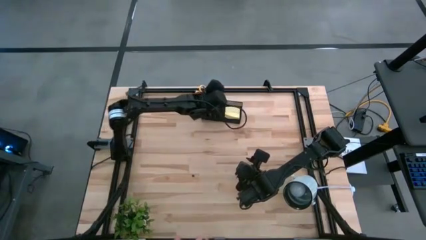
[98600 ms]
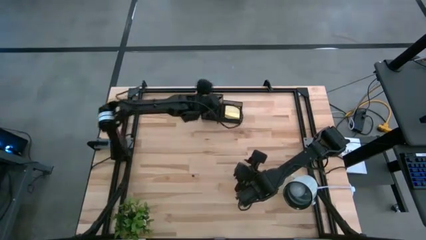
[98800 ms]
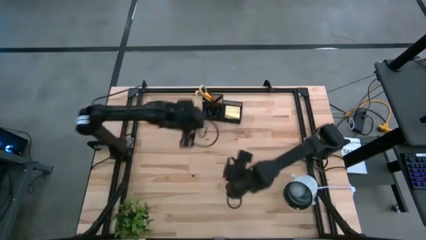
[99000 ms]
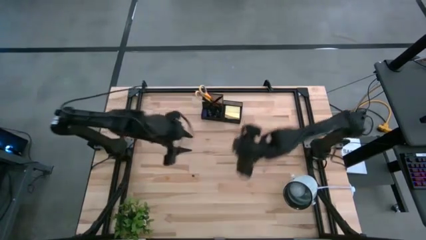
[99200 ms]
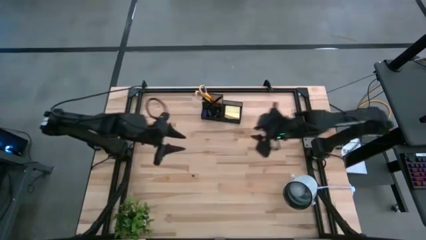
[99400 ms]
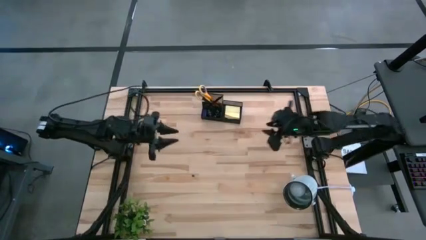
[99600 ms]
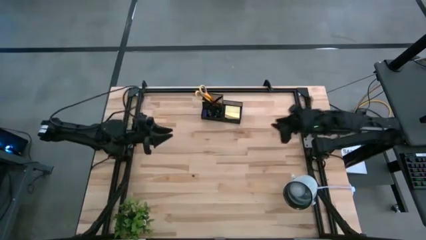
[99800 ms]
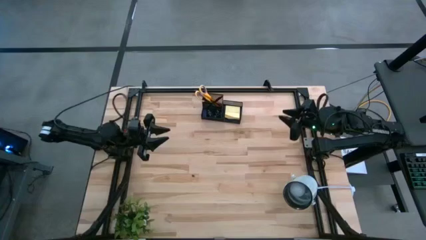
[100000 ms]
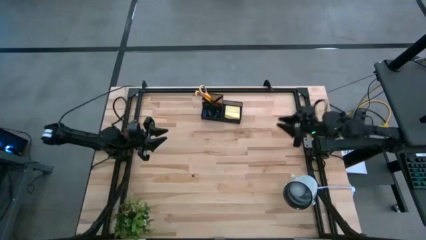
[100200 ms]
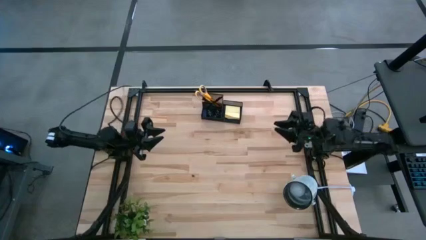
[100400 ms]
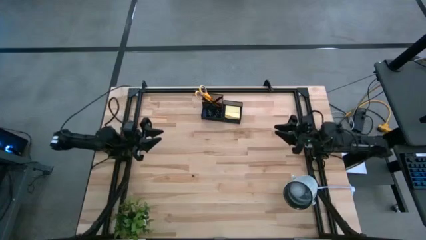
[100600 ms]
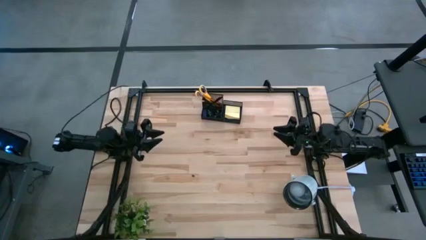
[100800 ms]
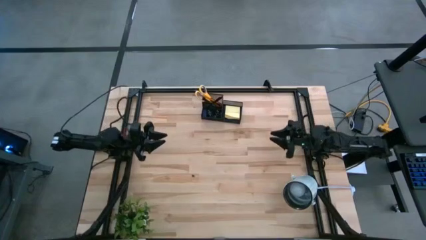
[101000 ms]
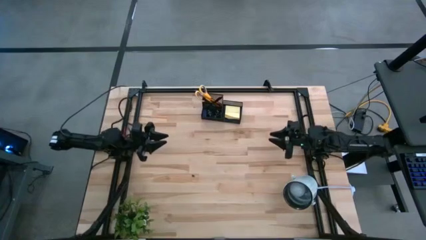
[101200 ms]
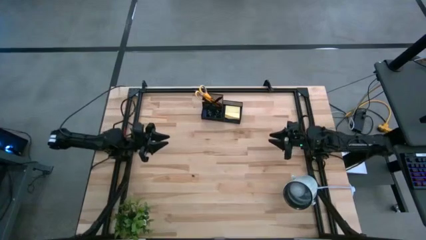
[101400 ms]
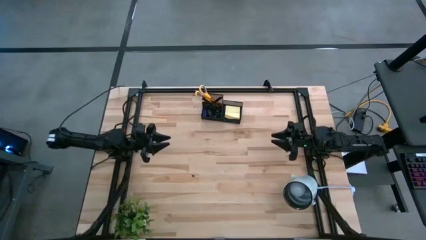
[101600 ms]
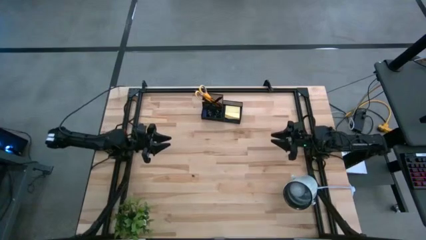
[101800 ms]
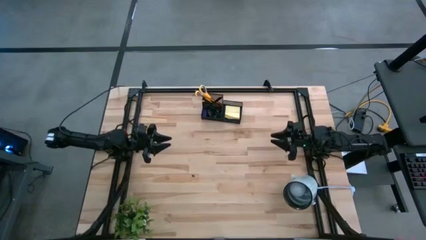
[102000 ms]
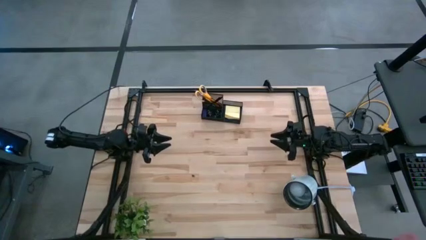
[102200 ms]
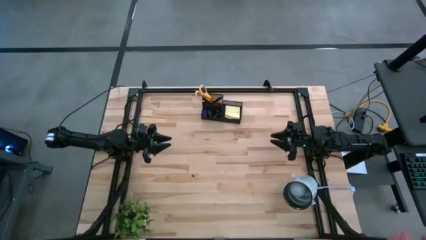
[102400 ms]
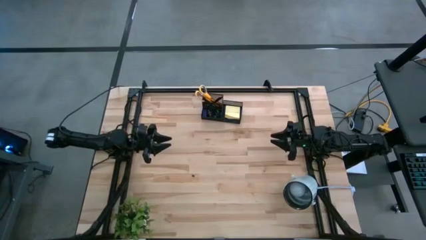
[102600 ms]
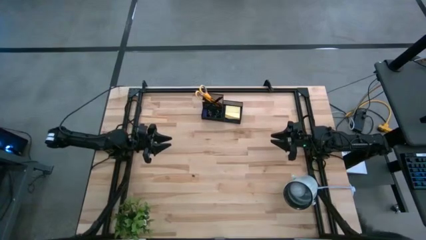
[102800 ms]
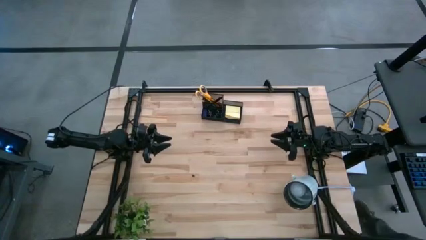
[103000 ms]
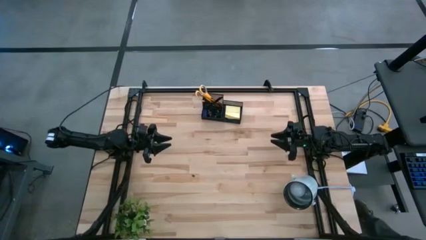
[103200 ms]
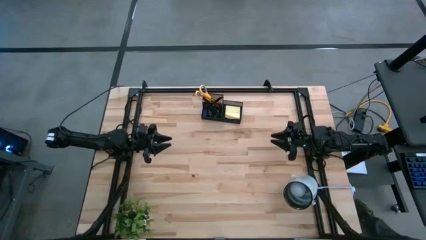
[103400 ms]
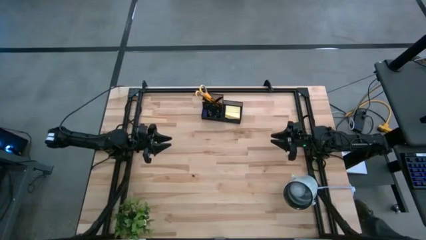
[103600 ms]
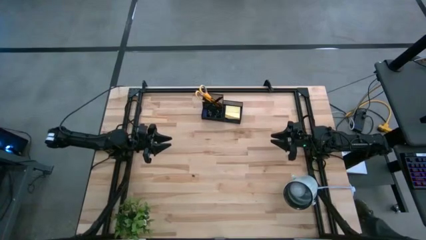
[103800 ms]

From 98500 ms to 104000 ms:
Task: Pick and place office supplies into organizer
Return to Home Position

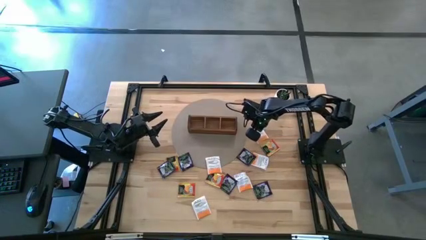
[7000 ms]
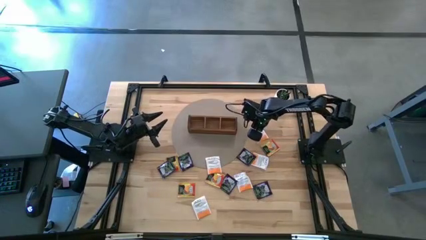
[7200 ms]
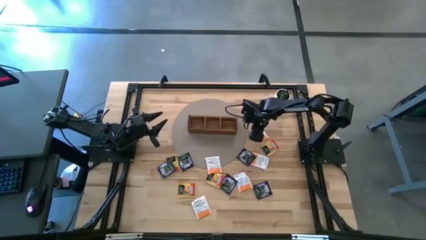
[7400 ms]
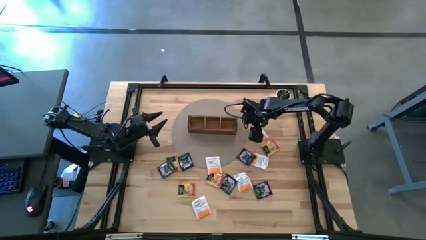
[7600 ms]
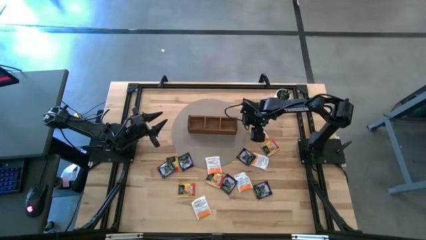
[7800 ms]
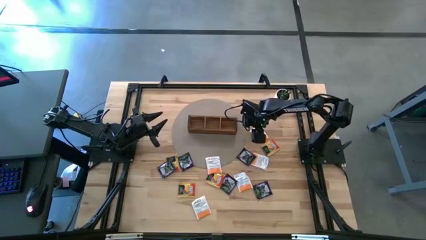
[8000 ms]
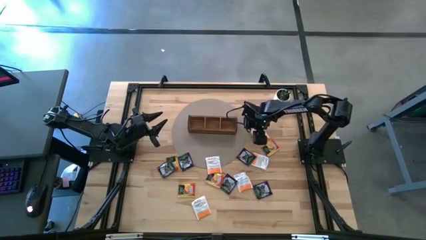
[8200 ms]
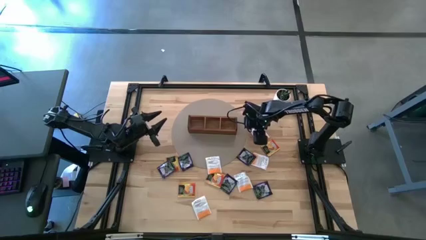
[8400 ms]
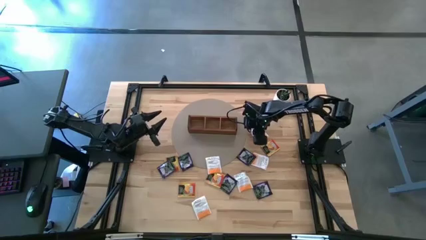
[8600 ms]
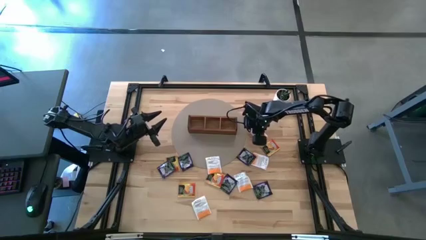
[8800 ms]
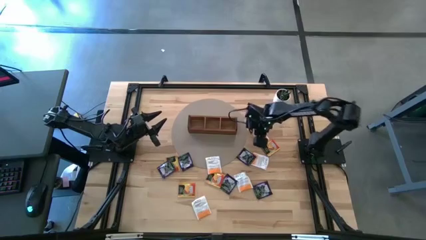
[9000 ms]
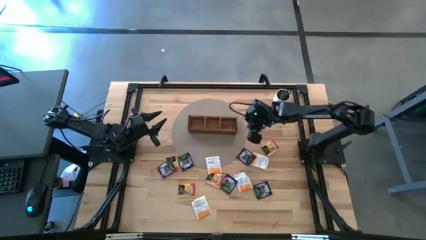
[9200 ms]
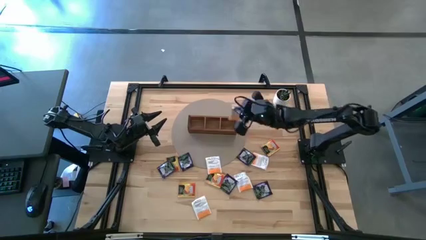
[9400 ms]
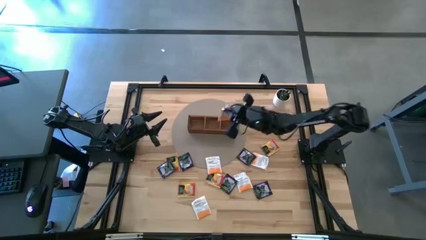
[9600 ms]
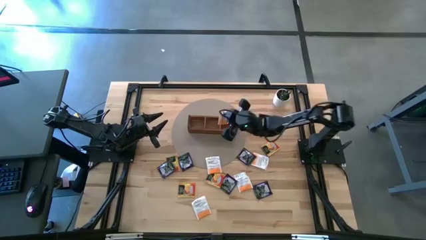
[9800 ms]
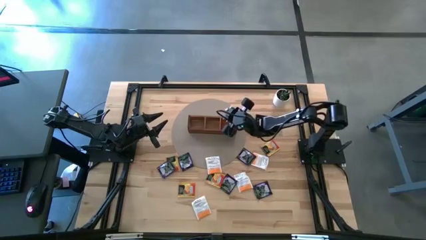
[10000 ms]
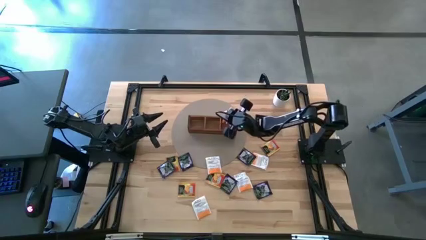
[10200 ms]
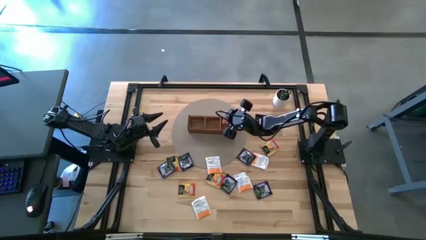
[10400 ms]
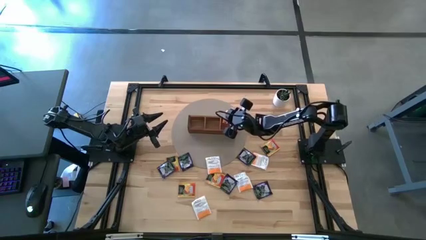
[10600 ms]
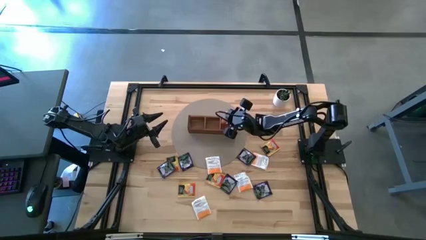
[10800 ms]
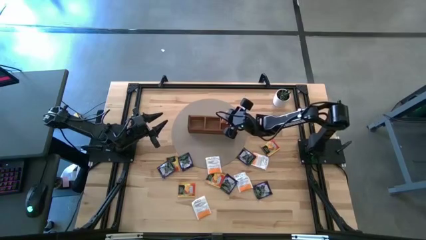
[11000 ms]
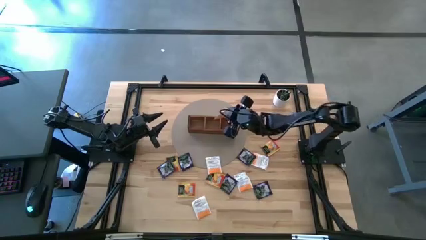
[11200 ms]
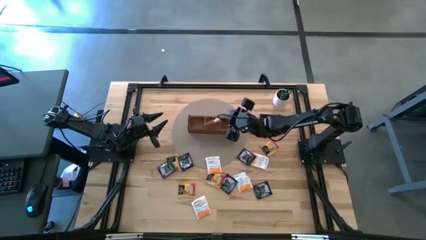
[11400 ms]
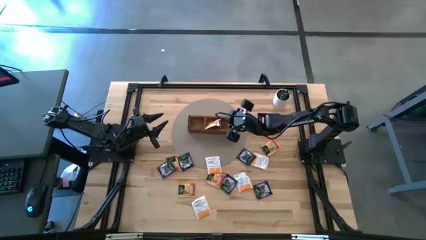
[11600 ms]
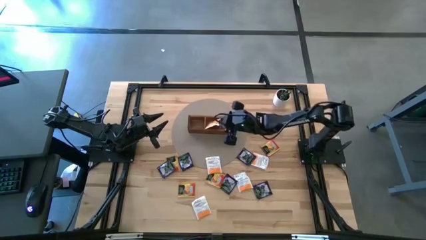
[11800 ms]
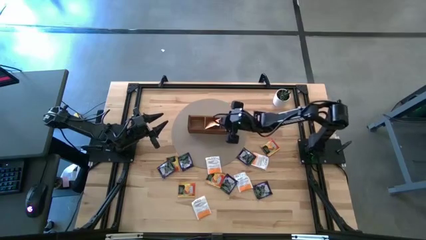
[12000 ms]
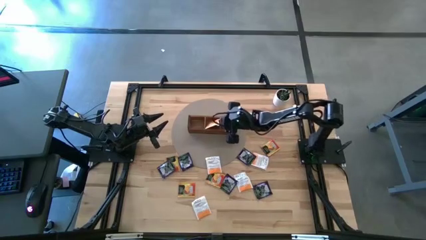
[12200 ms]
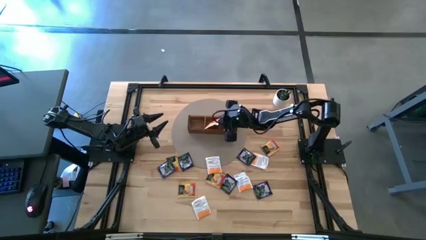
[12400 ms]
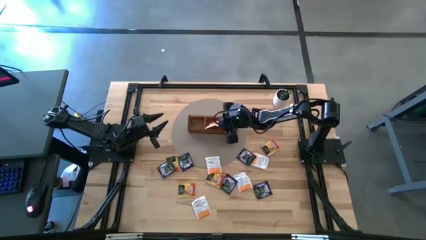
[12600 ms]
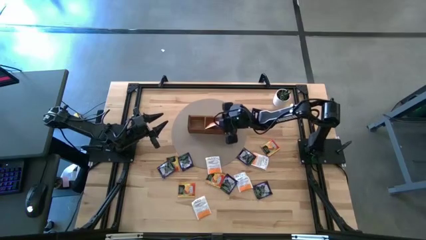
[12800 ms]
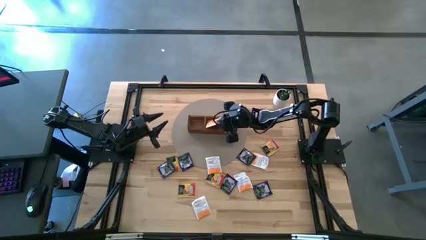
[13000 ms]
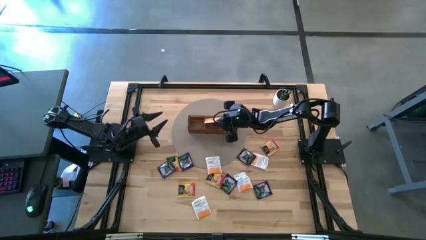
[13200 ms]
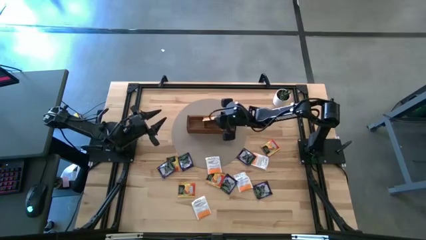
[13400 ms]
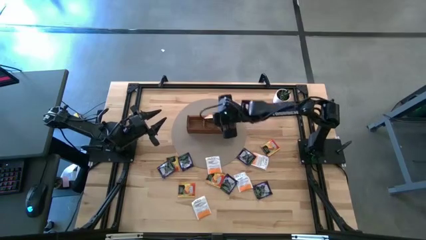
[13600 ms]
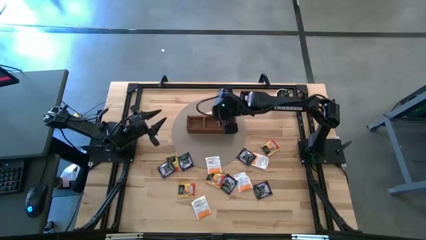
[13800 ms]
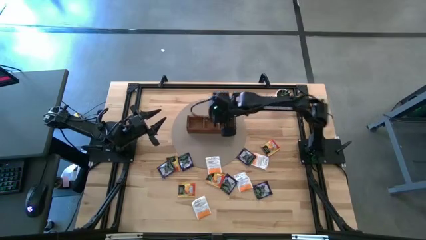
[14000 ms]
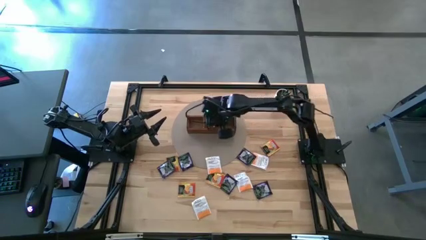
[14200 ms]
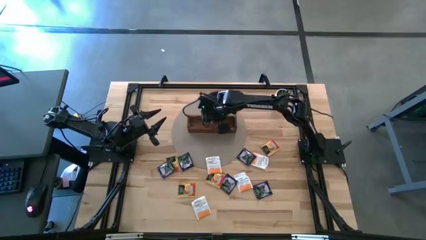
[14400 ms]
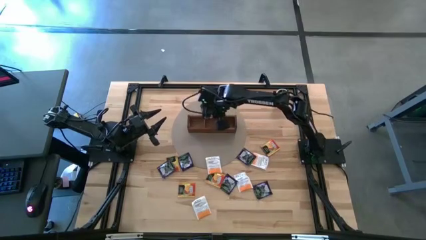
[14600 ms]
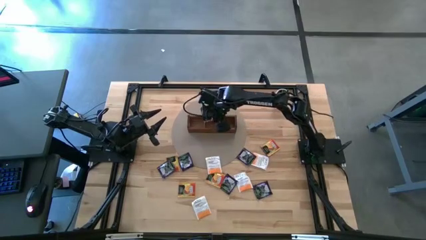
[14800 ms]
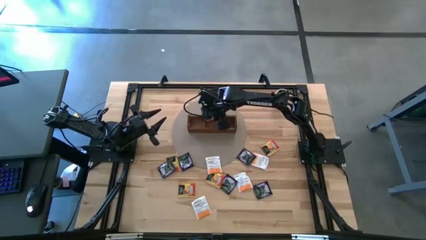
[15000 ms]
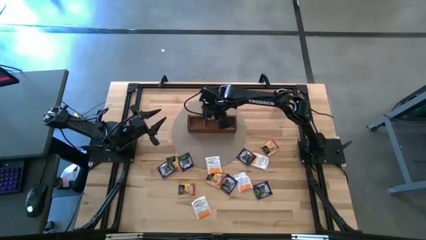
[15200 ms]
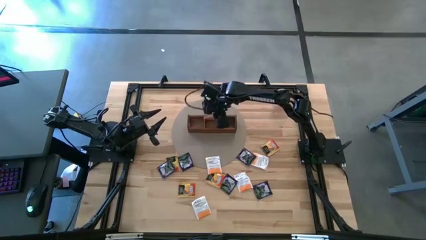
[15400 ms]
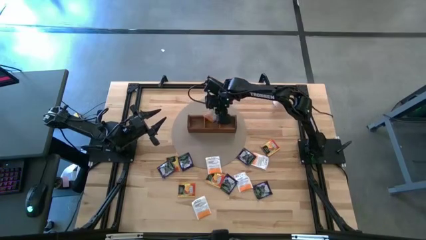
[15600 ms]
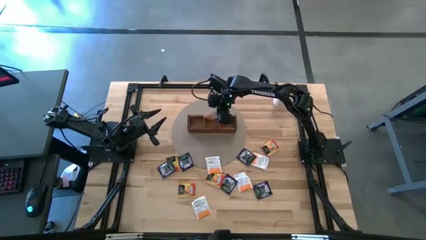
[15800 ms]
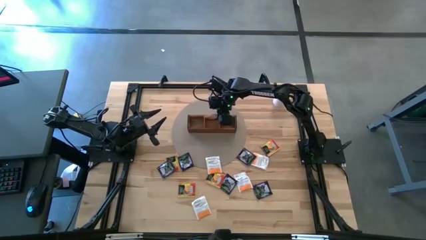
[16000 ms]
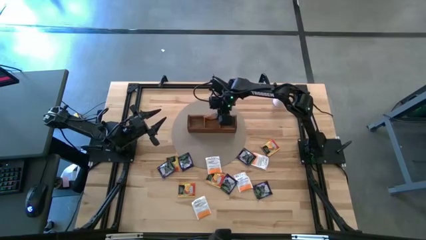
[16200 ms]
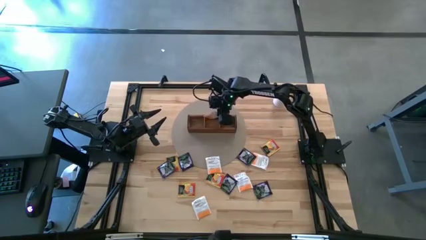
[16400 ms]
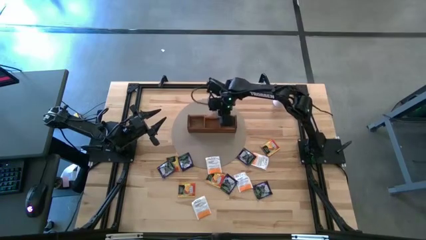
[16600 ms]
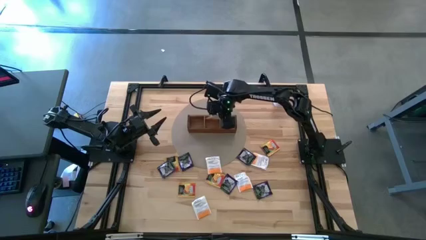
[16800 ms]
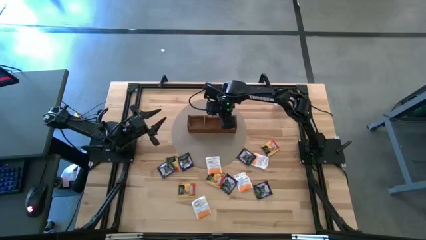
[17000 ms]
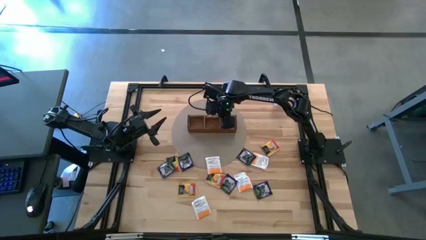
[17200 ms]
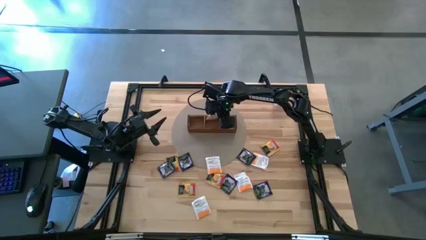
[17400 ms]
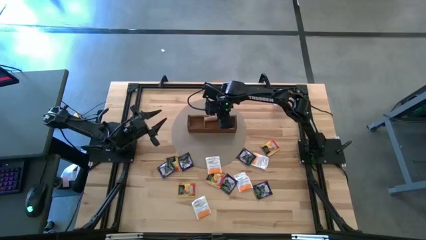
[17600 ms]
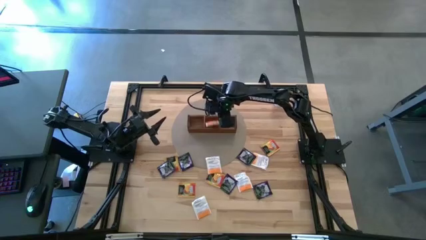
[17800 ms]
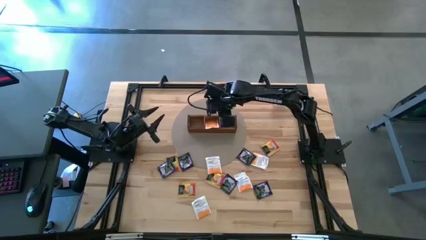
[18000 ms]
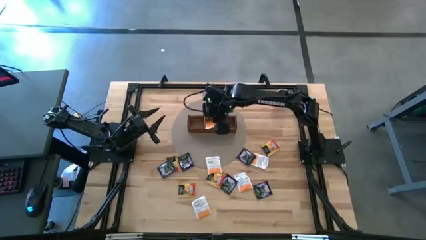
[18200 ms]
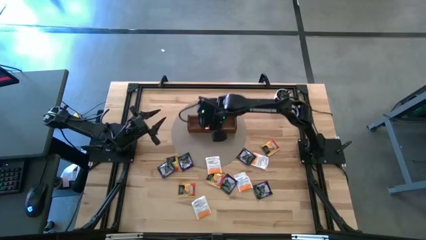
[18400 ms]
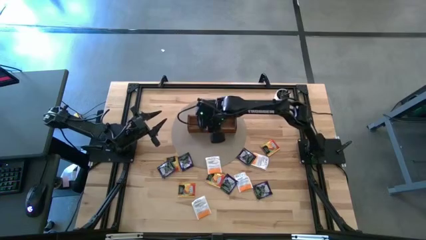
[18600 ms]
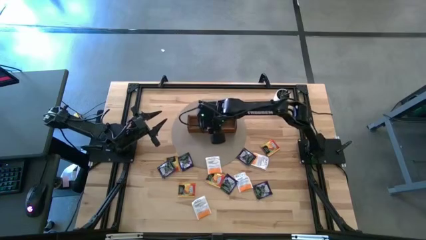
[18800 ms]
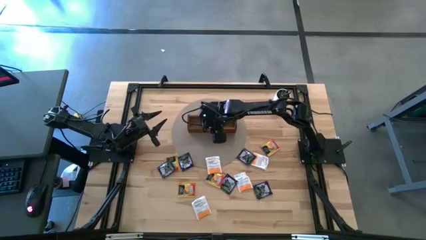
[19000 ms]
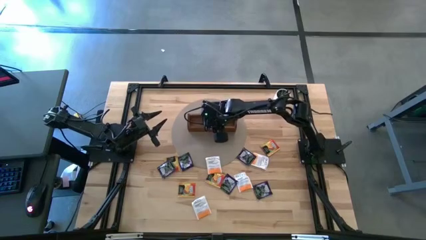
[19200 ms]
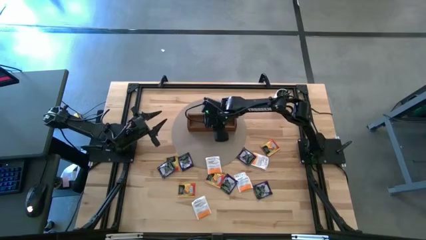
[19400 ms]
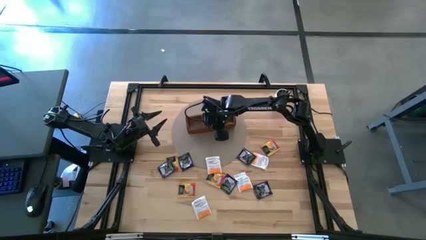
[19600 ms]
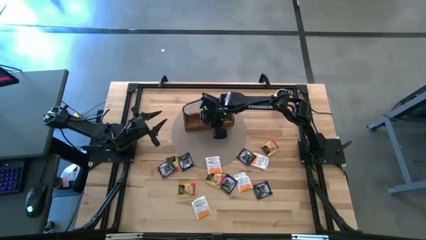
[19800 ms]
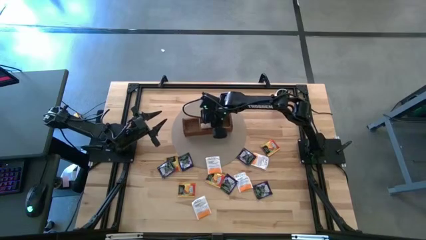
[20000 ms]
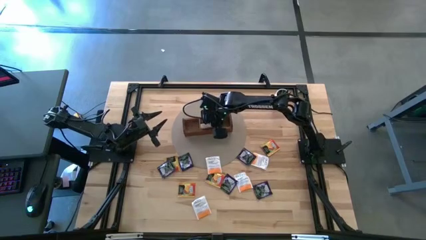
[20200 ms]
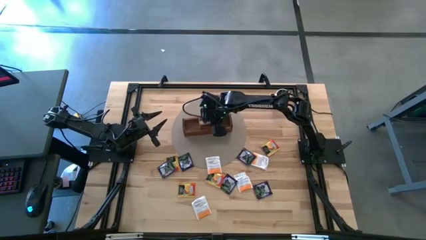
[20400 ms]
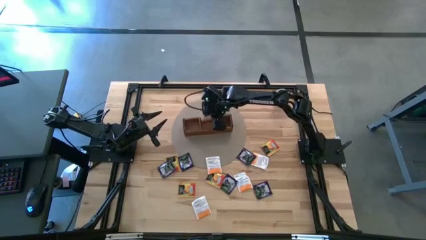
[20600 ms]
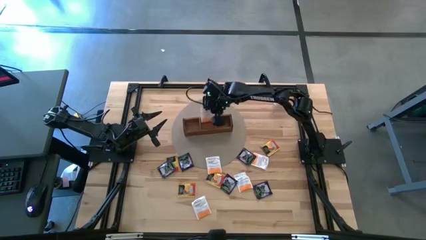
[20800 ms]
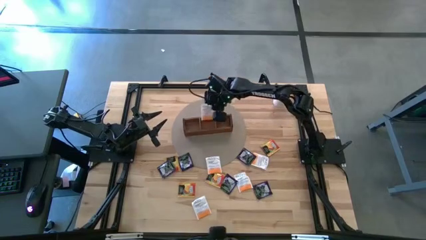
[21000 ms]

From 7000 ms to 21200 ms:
Task: Pick & Place Tea
Put the white tea bag into the middle section of the wooden organizer
